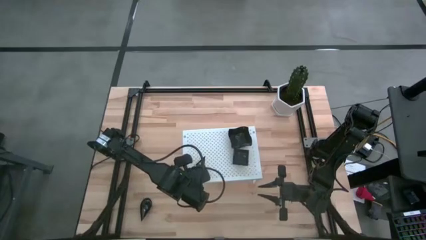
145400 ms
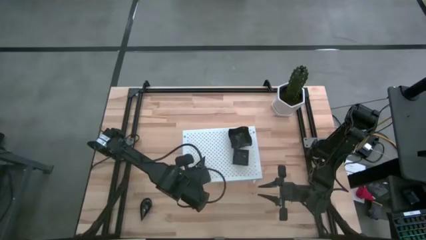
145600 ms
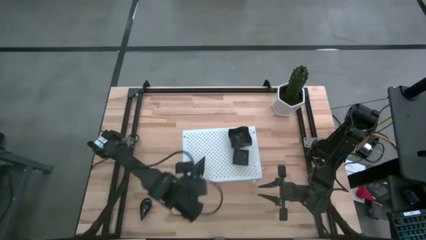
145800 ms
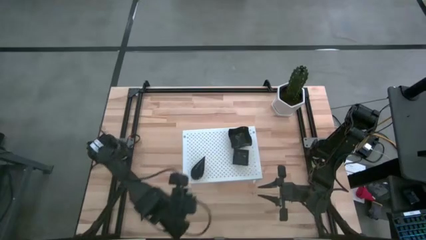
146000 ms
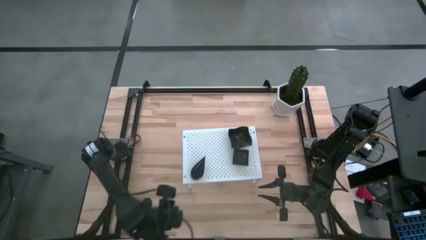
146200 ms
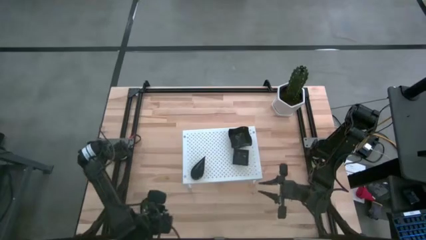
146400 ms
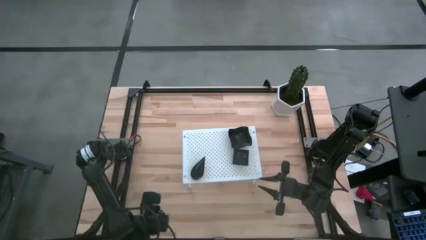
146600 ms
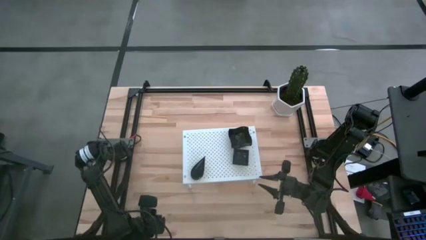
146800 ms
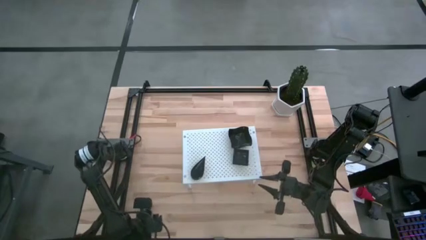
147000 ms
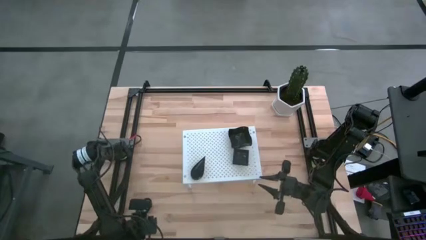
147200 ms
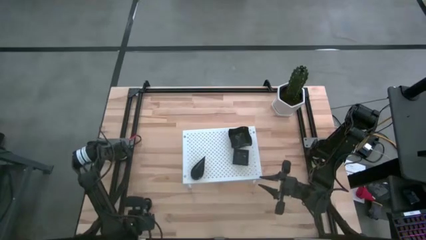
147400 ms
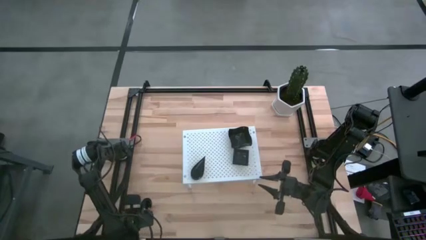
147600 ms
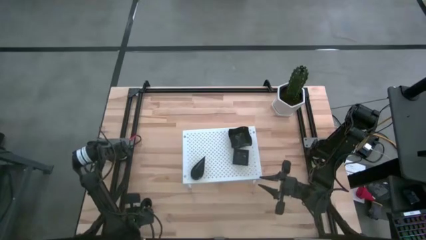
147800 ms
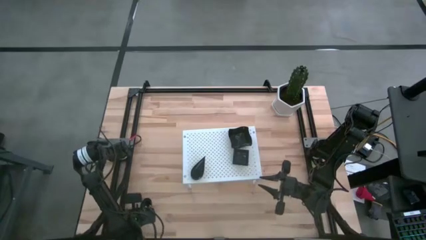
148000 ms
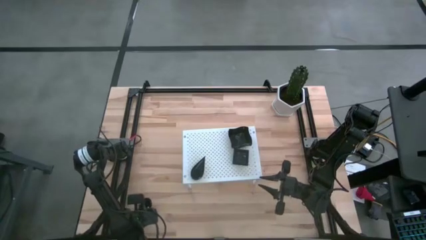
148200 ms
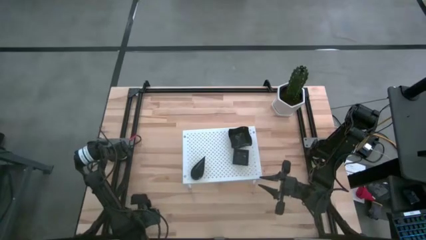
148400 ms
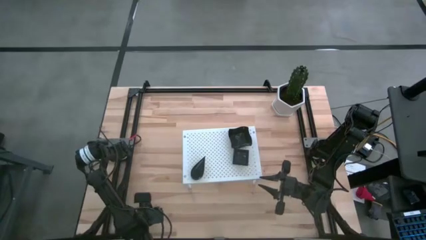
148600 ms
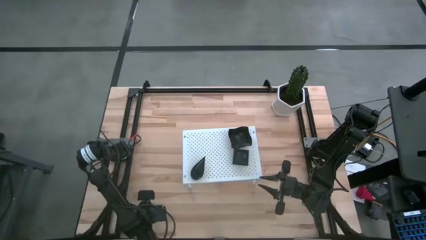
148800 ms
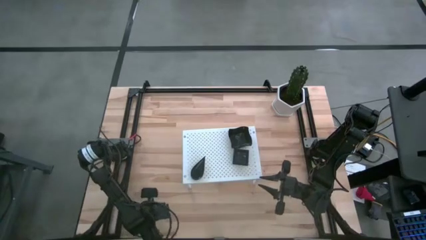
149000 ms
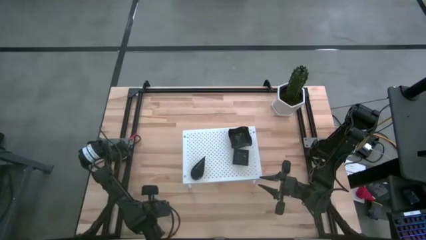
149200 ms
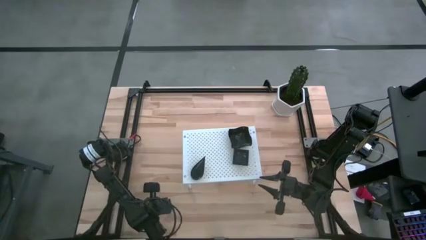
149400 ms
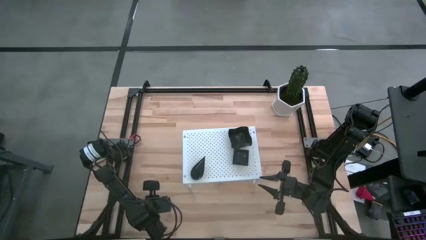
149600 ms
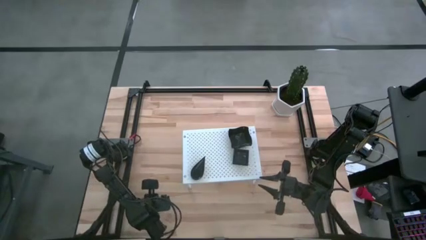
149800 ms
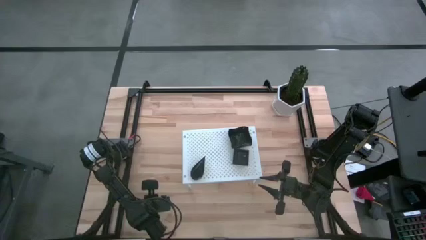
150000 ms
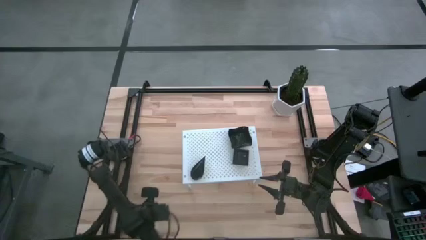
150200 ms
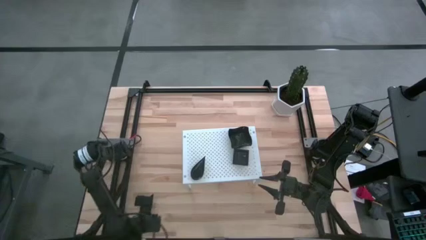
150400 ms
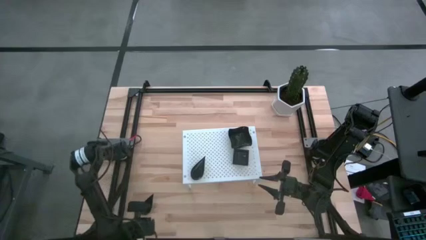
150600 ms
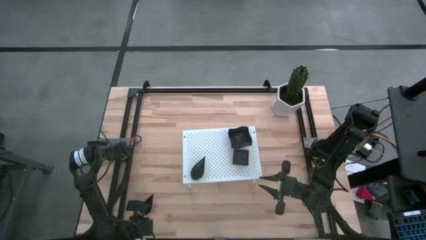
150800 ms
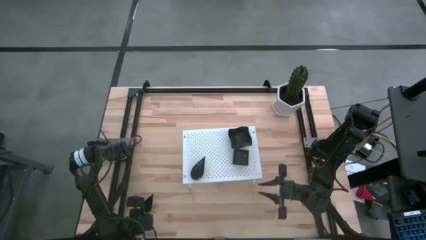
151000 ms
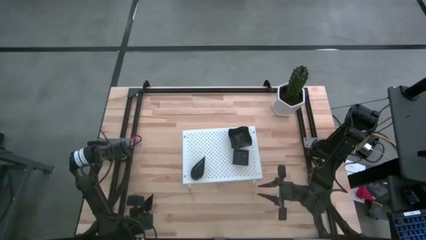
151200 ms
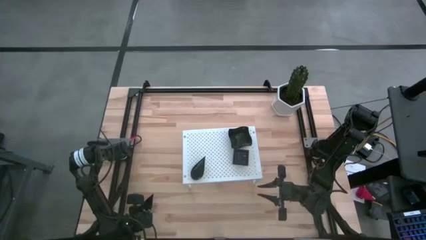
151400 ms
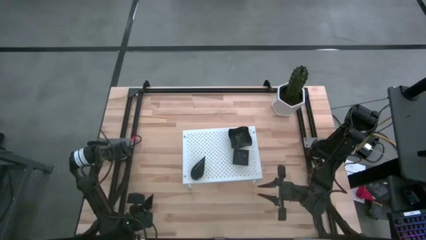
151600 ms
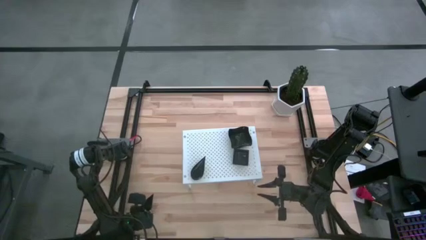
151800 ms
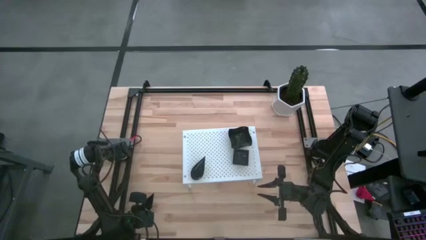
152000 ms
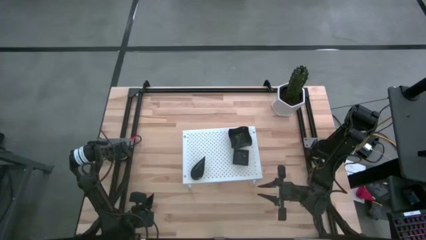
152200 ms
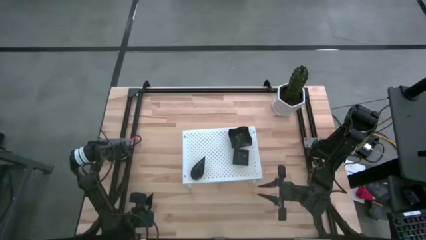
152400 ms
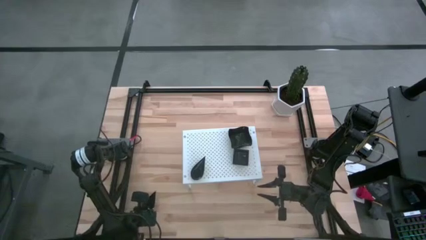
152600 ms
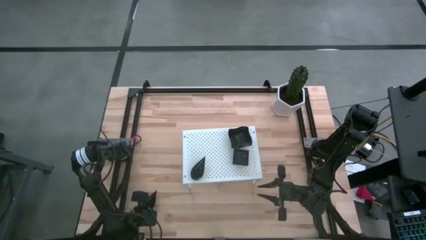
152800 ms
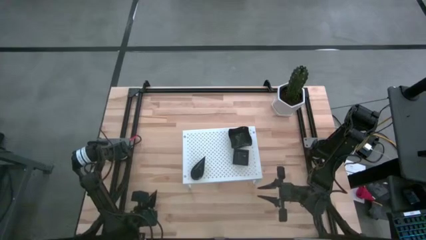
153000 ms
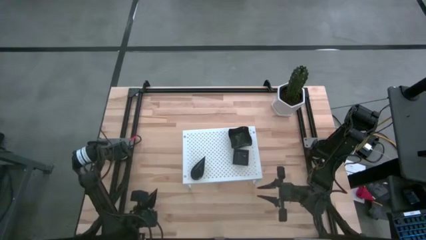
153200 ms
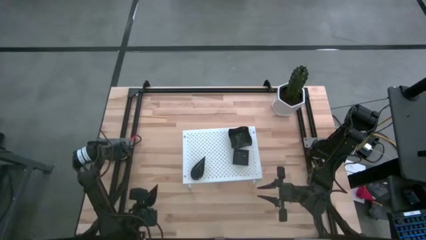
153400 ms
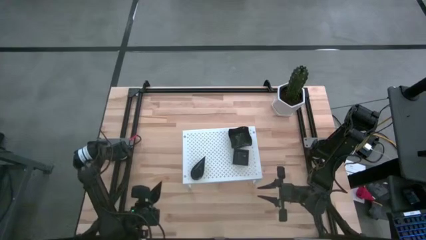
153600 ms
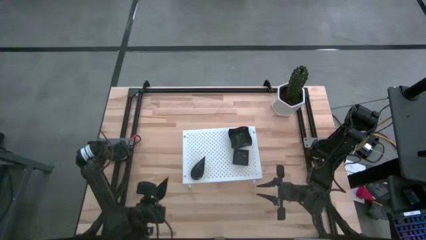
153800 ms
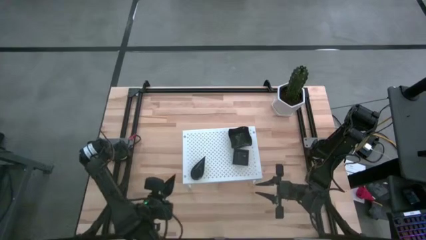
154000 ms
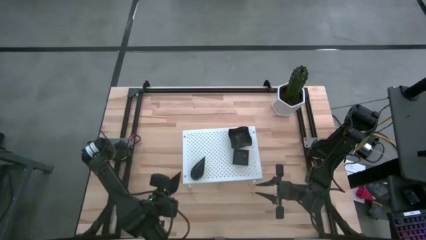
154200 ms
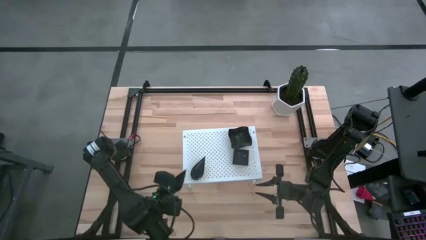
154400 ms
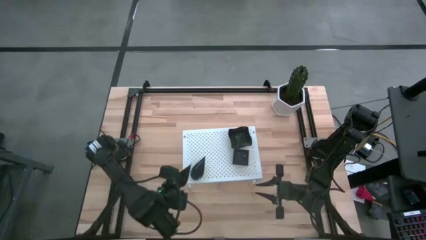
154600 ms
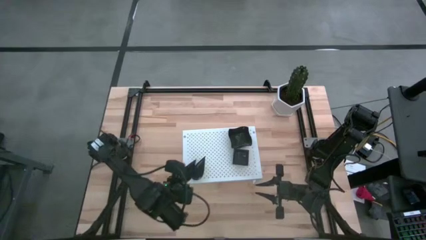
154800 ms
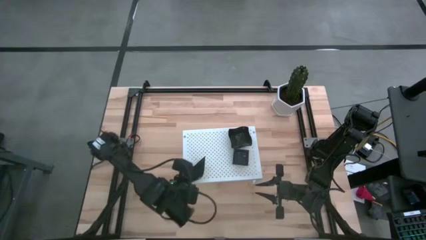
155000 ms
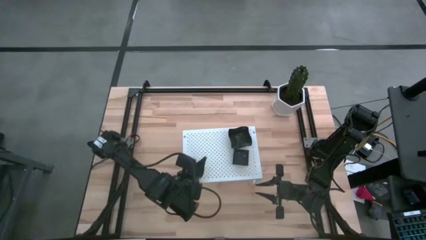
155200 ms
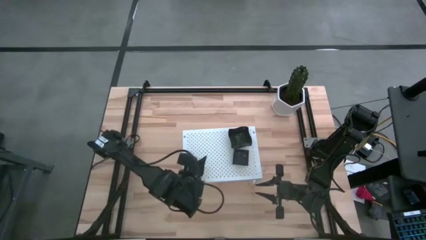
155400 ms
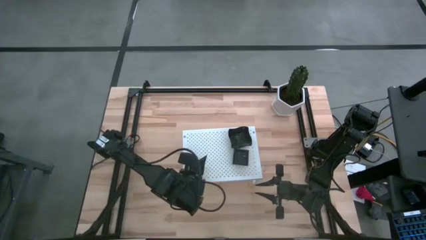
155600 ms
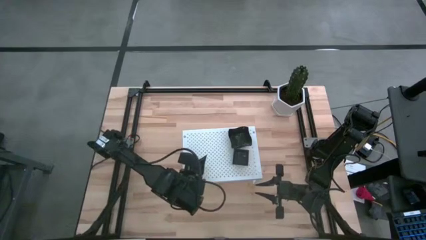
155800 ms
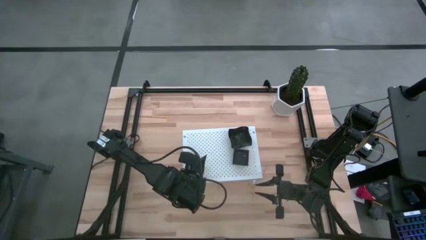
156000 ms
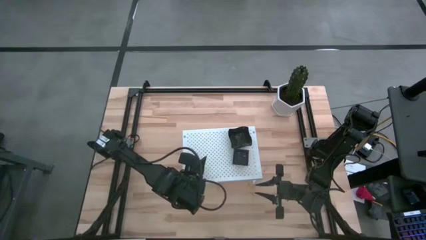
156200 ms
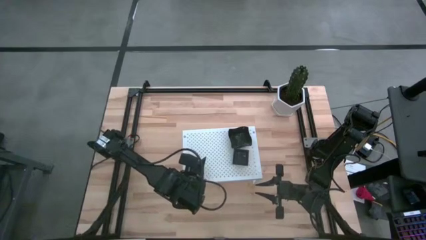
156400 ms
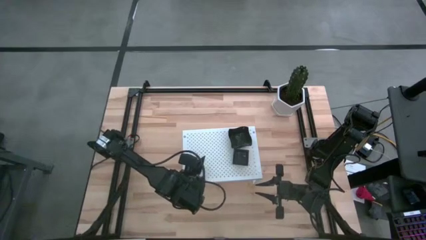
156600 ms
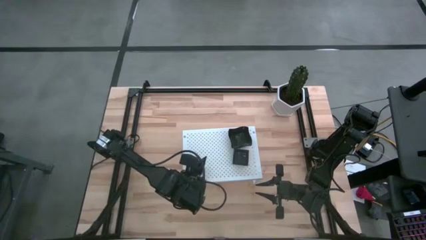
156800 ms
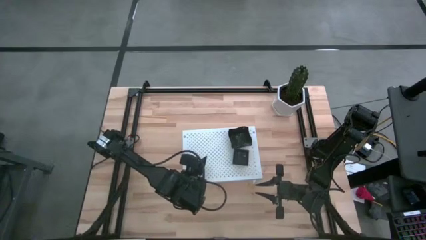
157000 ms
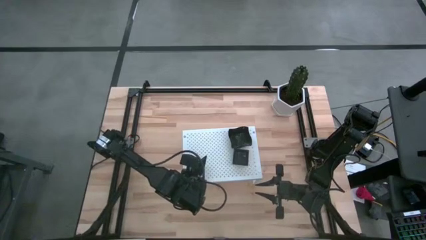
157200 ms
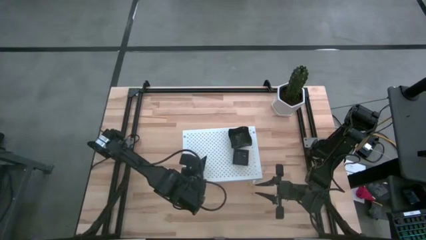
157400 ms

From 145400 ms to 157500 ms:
Task: Pick & Place Mini shaped plates
Stack the drop-shaped plate on the other drop-shaped plate on the shelf

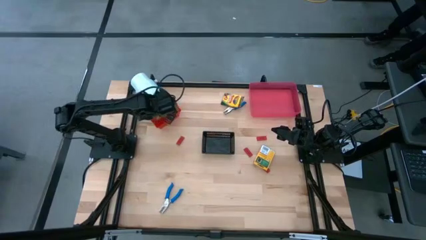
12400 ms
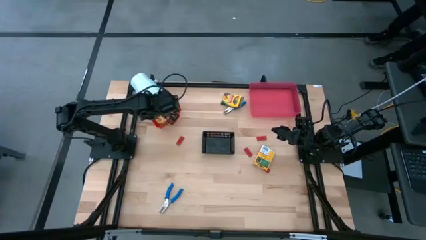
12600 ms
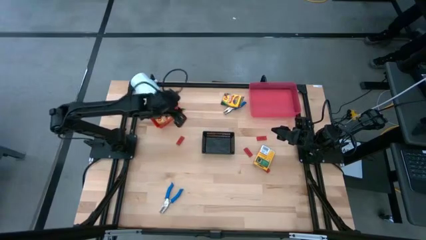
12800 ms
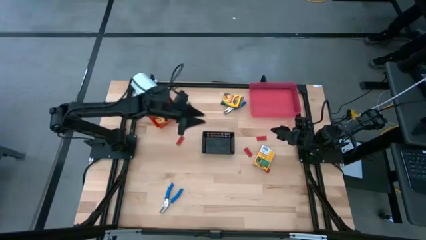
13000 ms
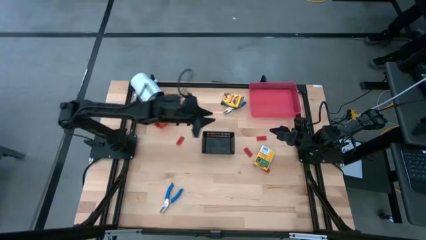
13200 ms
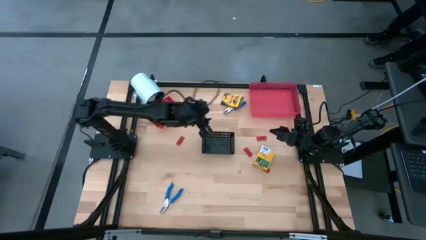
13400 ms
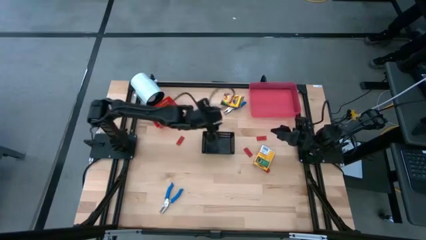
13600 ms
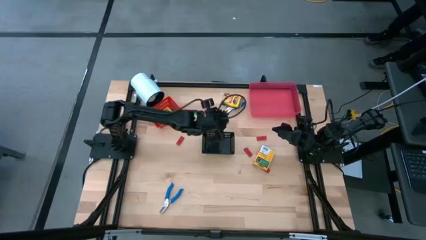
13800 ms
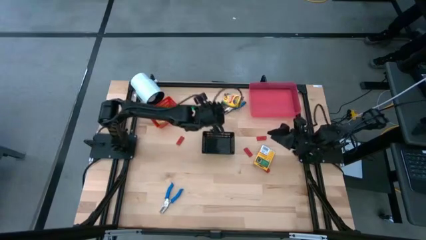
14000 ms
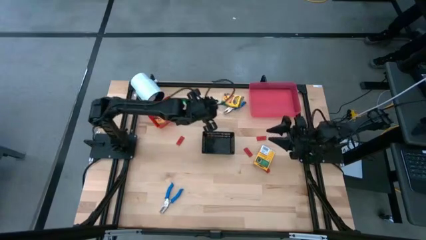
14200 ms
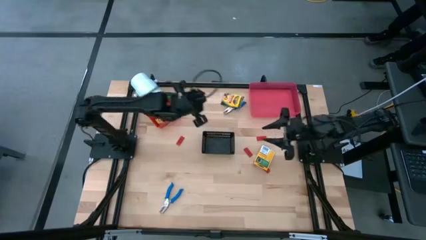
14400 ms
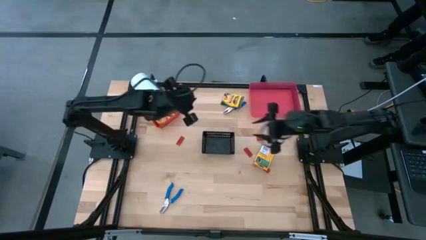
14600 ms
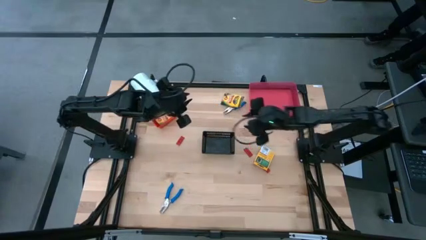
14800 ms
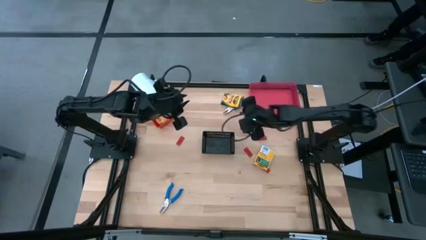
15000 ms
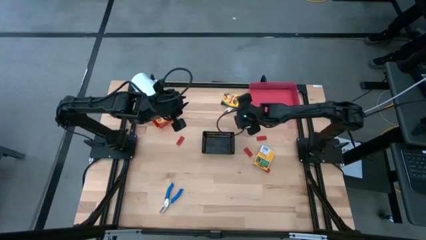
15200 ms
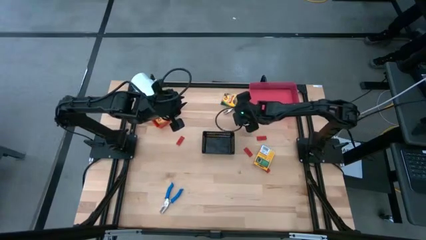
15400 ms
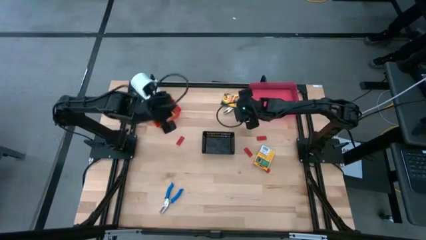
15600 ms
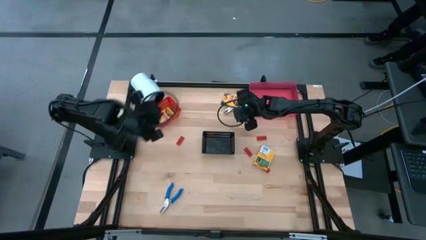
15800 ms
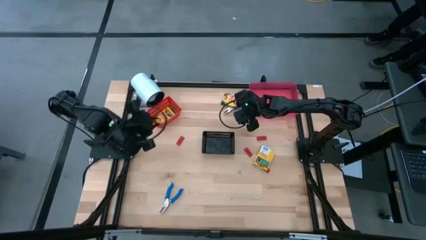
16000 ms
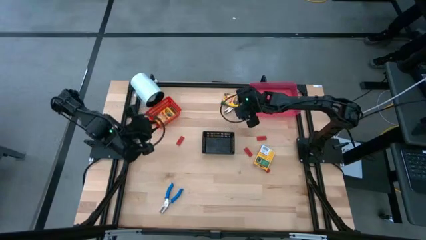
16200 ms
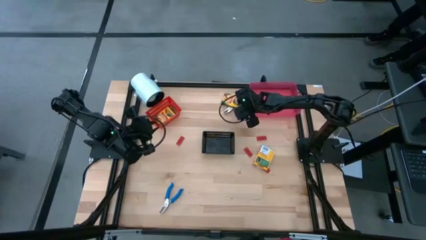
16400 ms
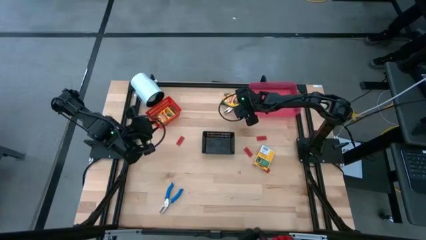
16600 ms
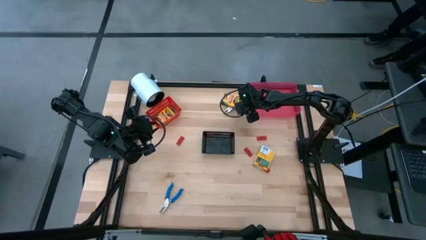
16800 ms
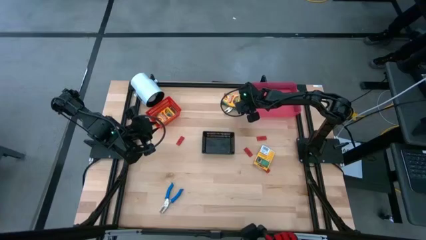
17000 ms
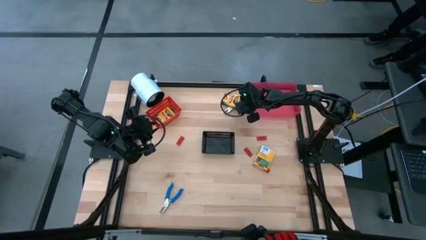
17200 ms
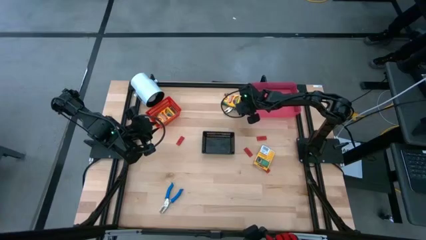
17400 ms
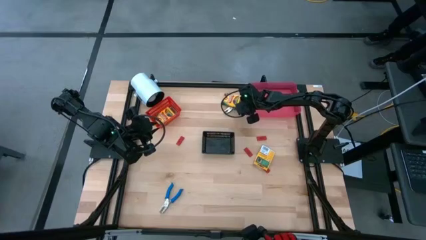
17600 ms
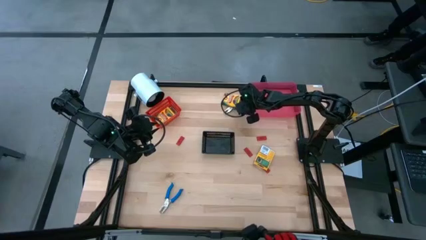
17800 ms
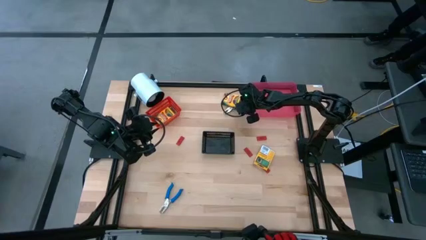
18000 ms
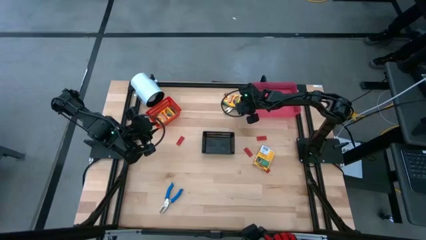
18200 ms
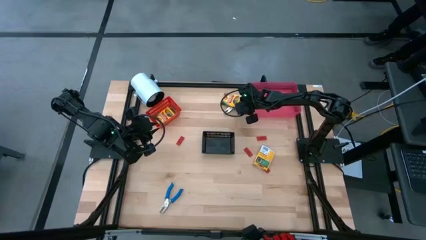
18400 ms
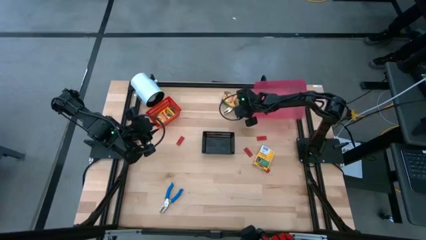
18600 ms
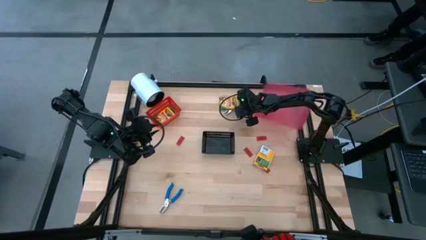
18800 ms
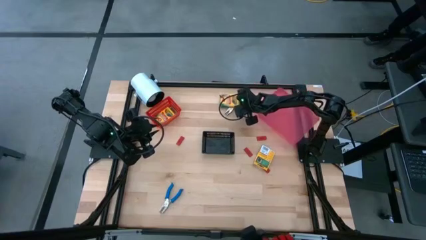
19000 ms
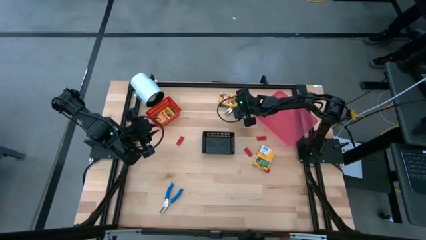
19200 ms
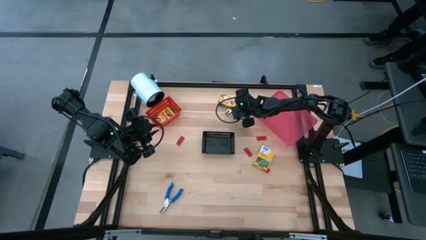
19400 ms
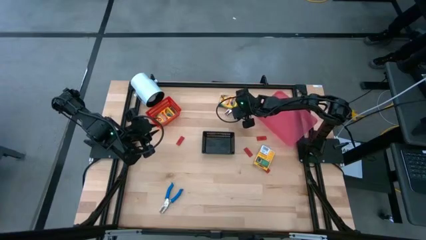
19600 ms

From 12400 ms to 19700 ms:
Task: Pick & Place School Supplies
Put the top crayon box into the red bin
